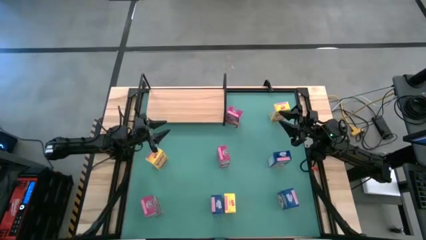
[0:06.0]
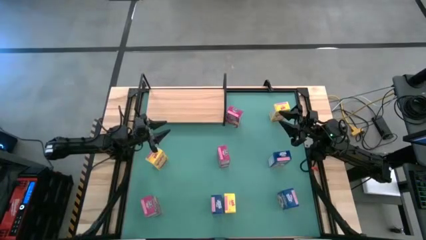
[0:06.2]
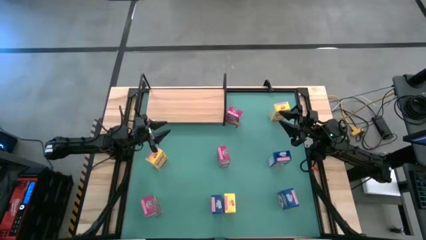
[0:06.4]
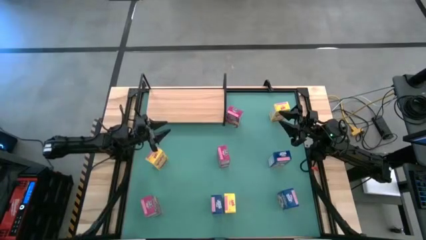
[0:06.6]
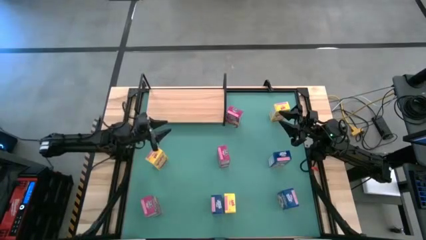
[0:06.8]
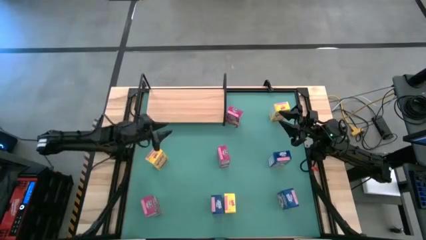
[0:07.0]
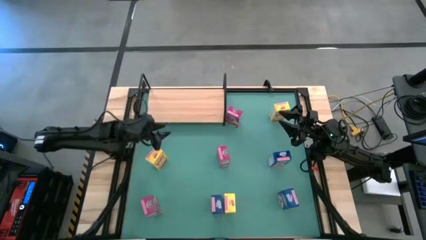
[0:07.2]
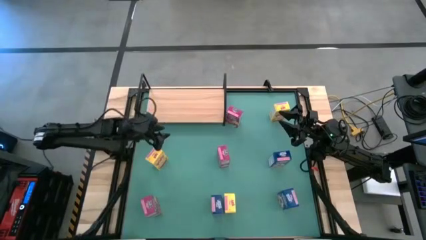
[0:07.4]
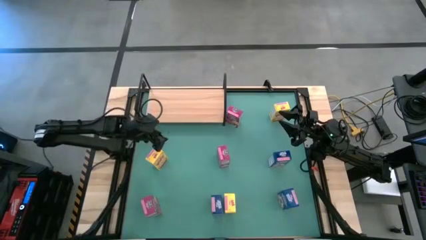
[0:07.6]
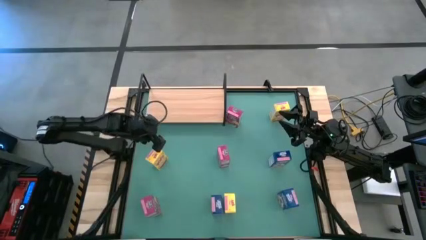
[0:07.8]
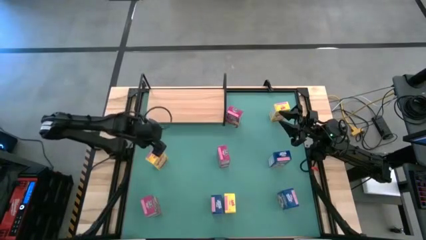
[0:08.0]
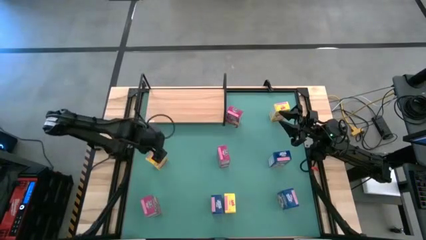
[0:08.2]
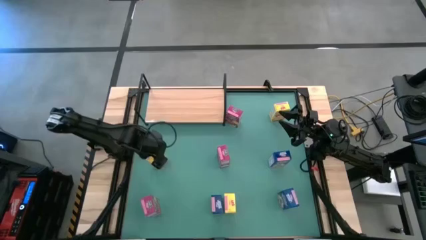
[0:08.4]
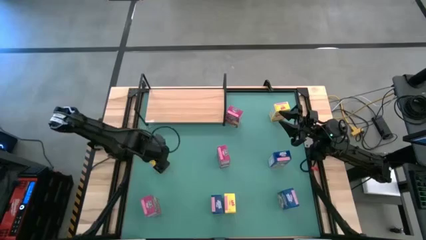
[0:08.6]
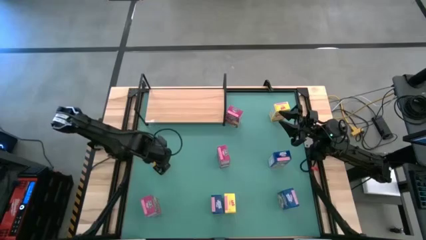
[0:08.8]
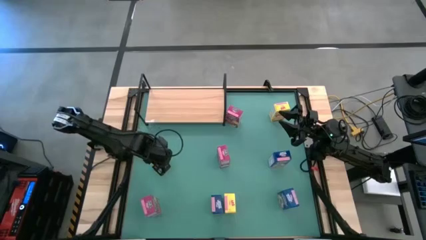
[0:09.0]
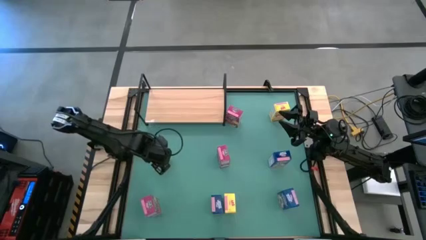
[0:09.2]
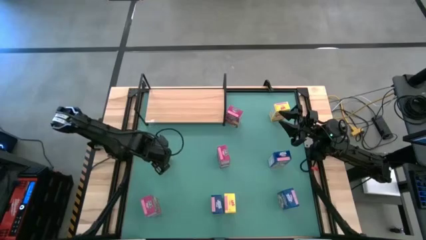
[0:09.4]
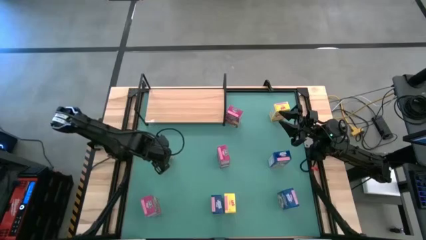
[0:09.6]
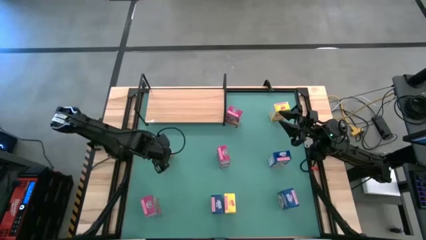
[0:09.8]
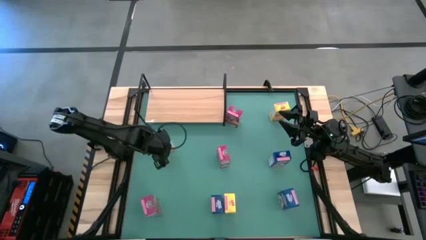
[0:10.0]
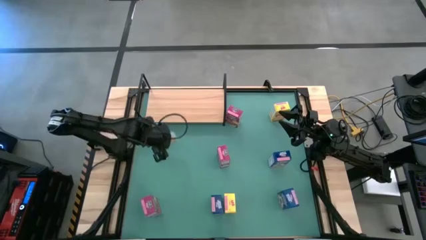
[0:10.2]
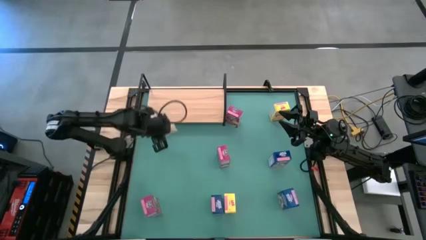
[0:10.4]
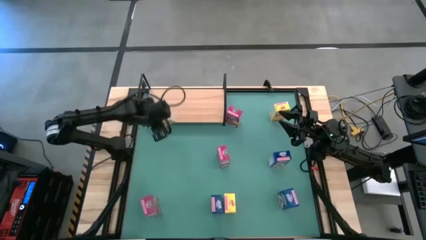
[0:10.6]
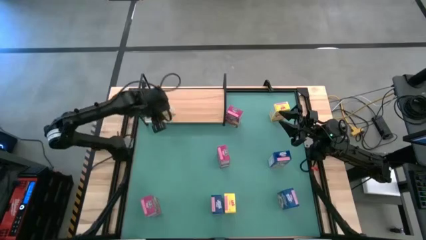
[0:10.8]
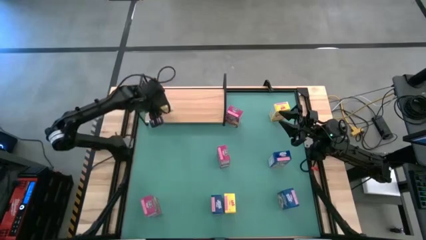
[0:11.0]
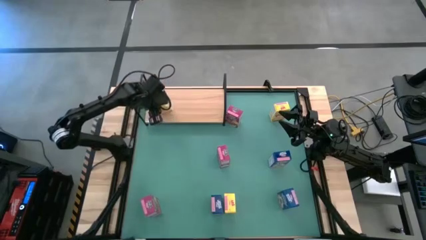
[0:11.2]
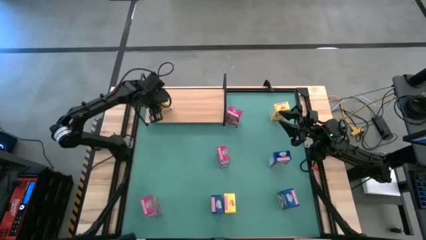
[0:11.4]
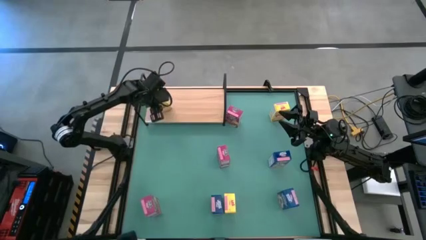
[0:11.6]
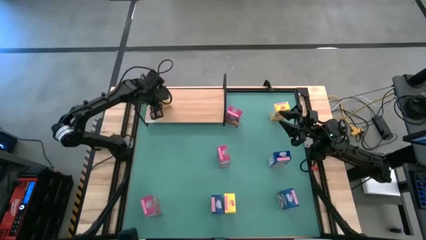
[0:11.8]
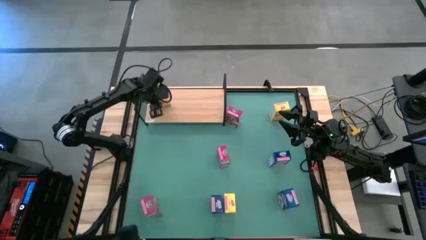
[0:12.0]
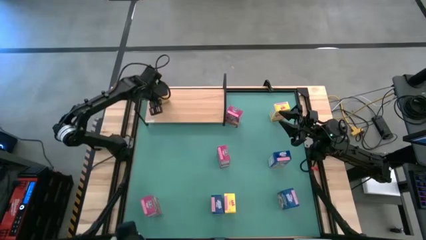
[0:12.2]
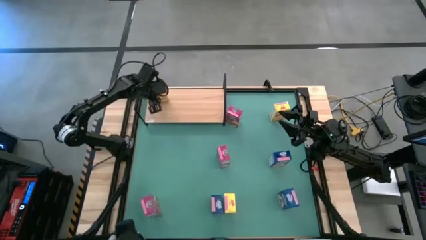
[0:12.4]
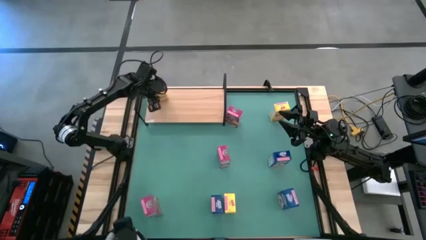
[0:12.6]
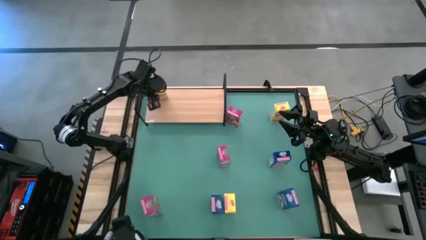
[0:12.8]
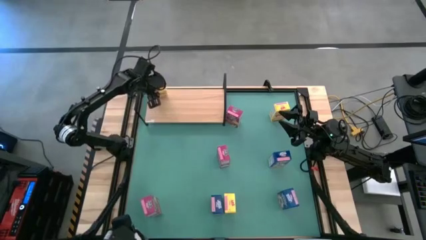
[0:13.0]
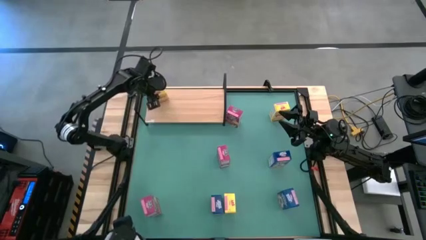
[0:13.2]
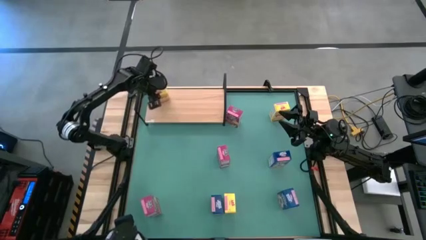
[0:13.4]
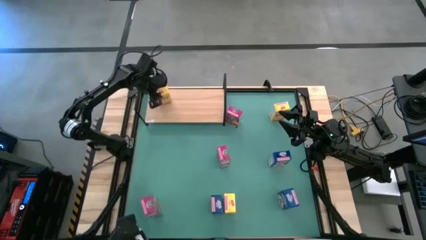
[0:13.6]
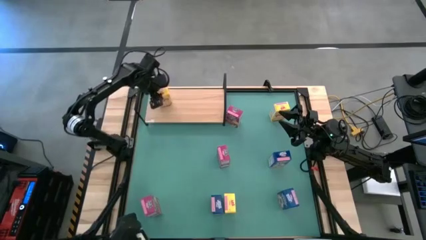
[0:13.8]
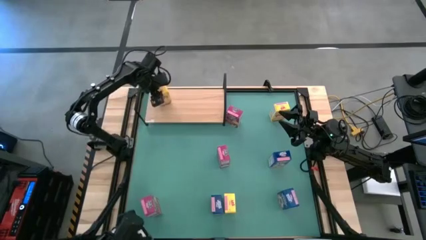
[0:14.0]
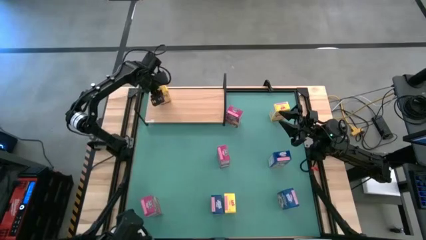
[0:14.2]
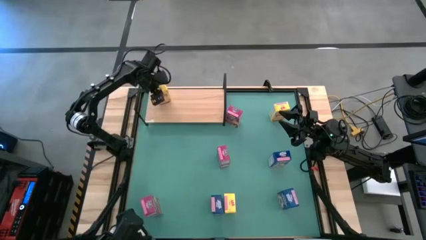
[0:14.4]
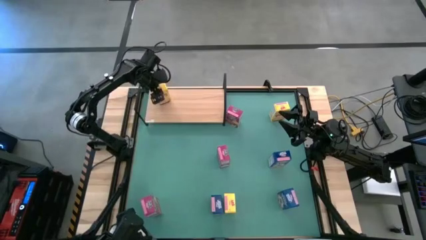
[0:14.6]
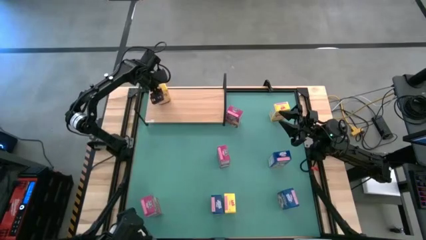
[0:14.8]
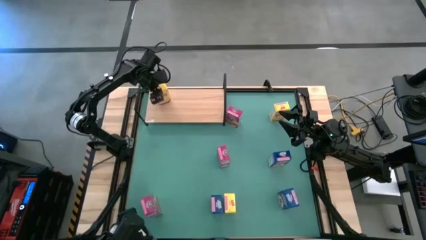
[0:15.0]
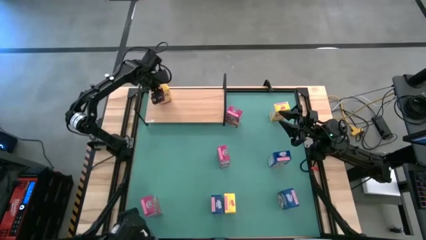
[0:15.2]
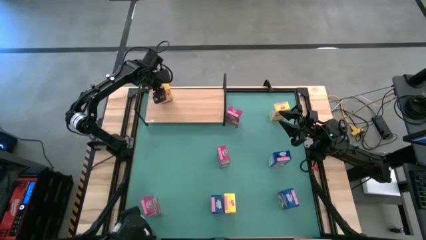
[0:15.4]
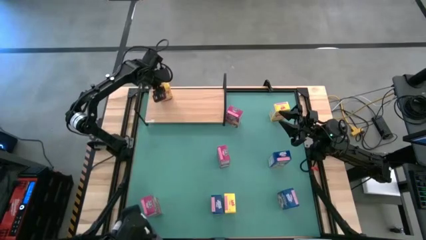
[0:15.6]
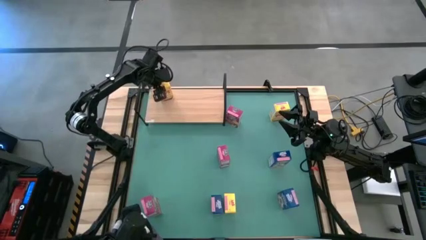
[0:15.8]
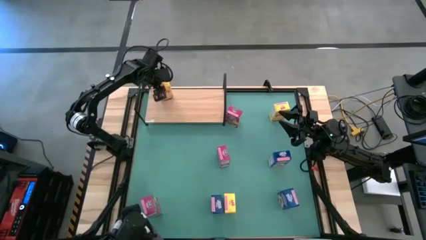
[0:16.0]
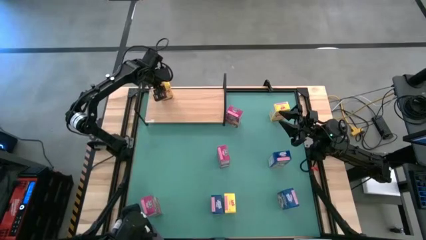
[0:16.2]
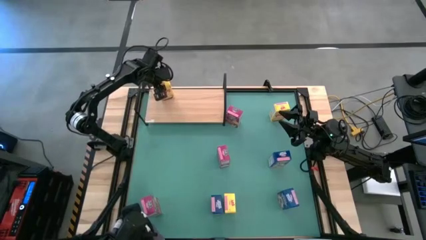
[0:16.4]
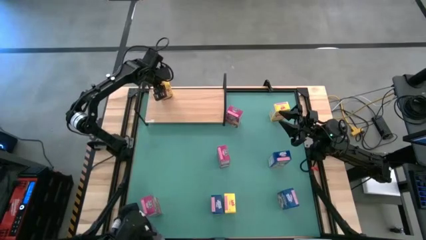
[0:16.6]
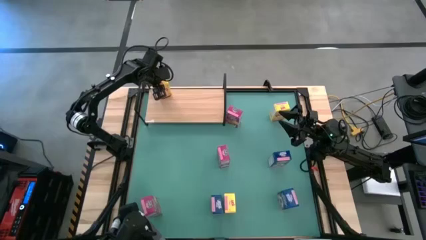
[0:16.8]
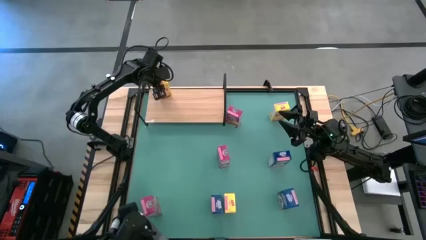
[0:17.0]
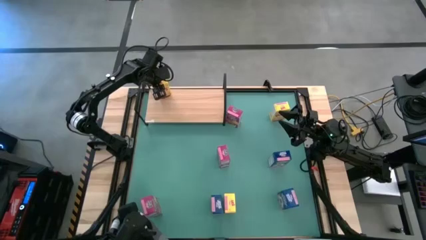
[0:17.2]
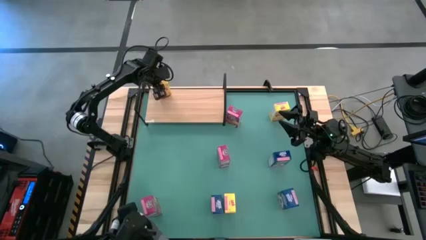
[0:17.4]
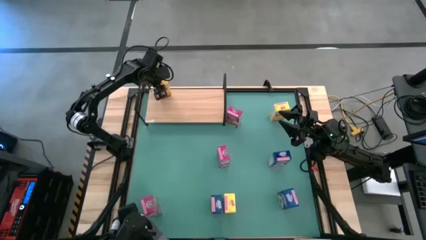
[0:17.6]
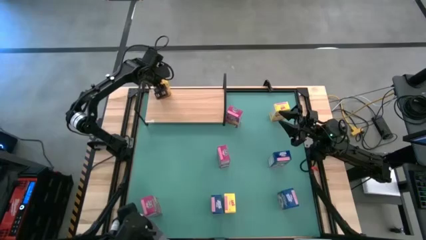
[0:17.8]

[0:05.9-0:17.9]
Task: Stack cereal on shelf
Put the middle yellow box cereal on the shelf

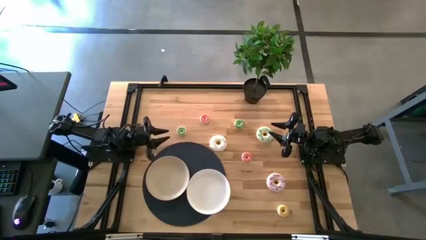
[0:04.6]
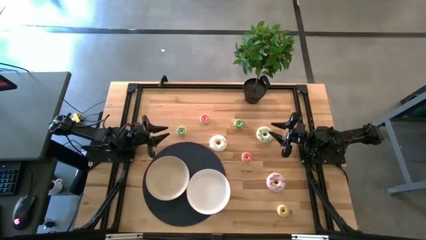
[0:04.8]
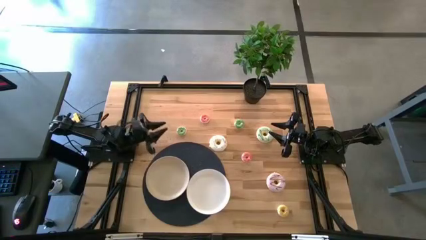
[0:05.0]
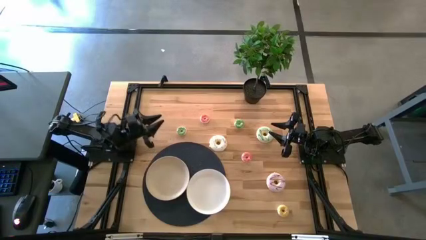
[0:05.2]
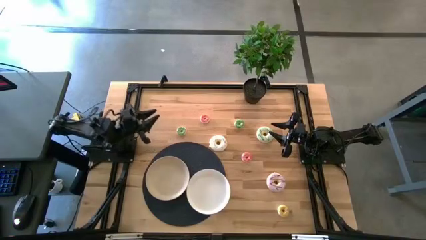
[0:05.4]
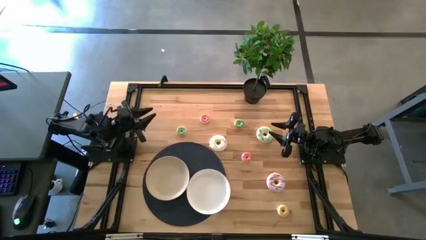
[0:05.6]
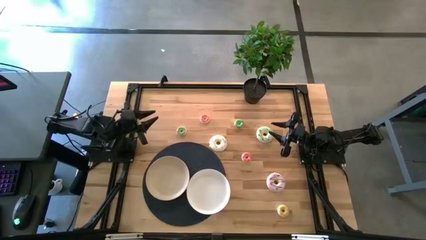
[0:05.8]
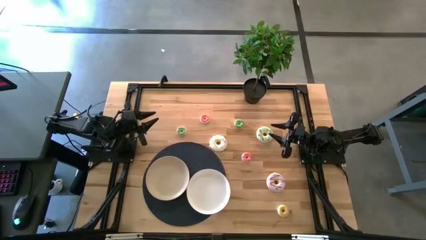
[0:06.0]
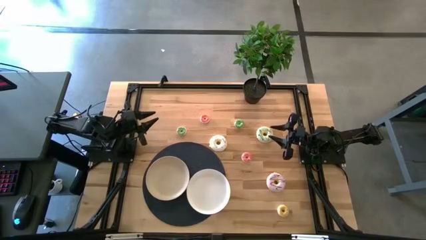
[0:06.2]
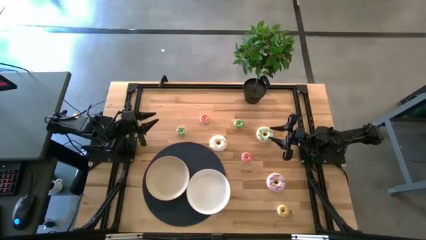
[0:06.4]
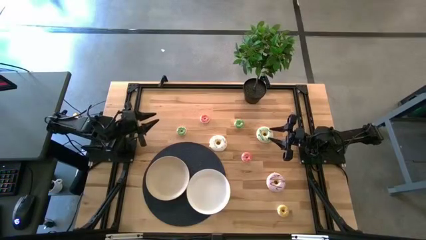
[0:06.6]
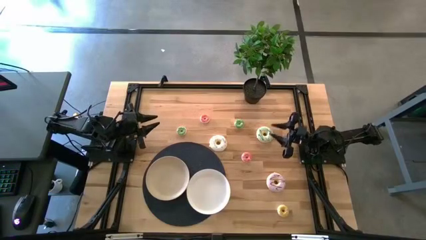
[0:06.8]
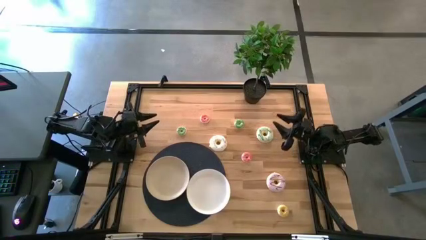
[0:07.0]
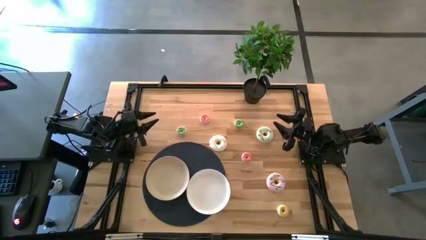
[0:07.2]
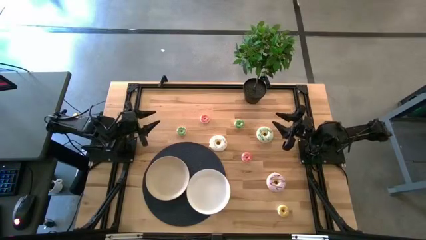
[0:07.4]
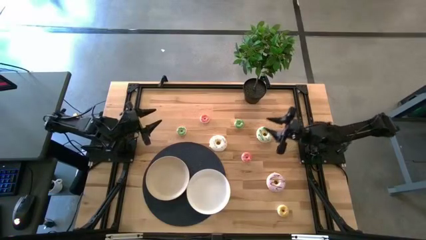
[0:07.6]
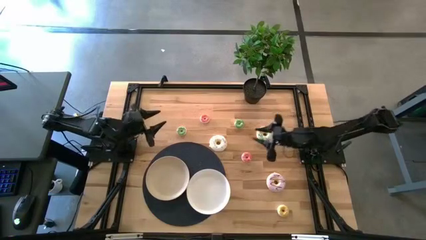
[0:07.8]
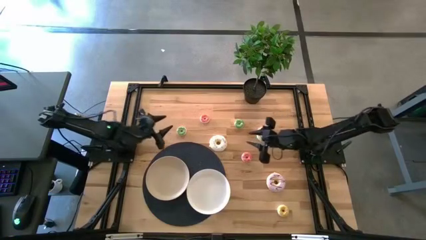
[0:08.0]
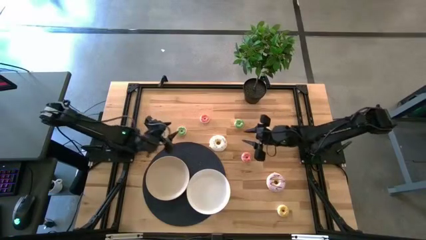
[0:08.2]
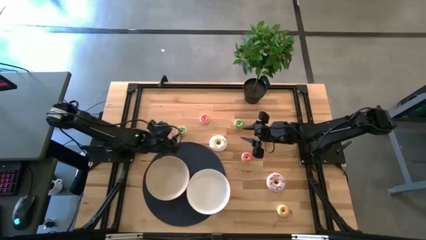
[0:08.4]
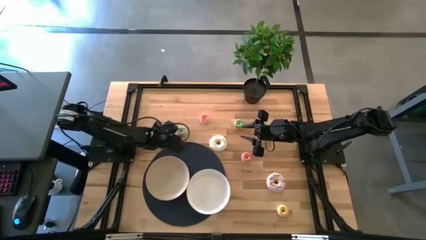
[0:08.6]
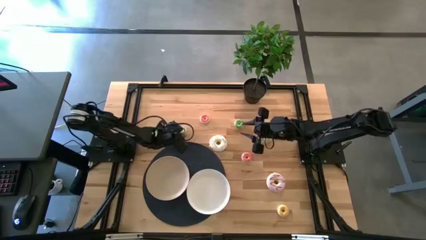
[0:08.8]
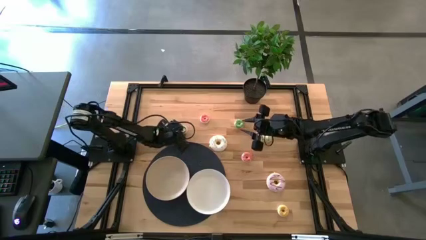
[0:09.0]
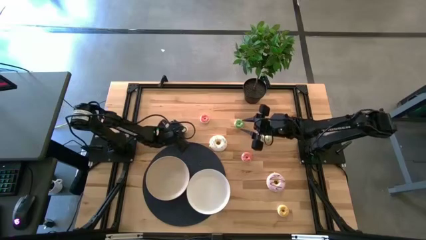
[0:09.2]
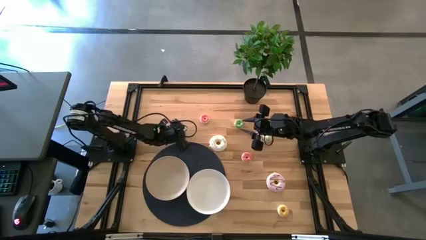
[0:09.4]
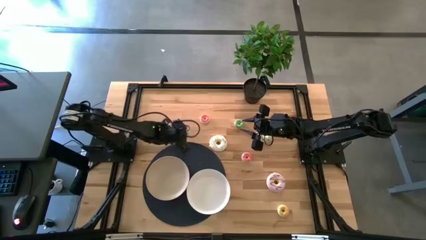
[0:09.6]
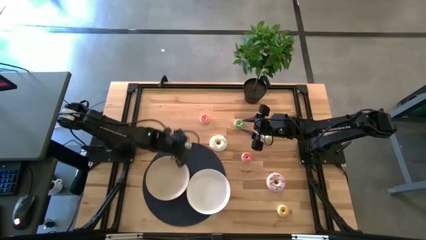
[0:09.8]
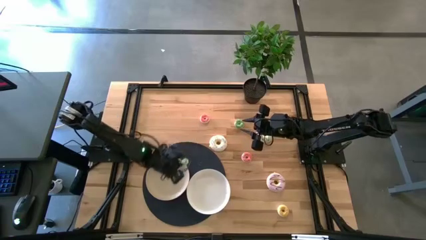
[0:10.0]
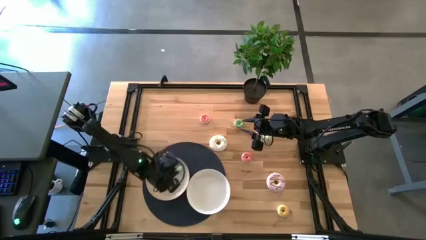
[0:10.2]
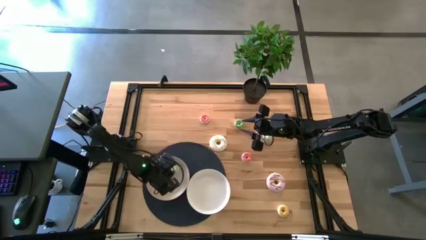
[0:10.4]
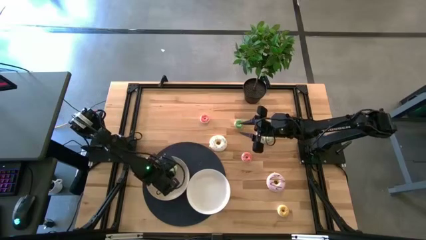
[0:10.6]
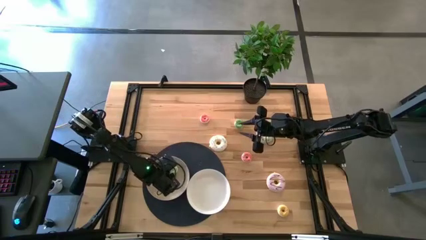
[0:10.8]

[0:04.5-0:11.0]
Task: Pick & Place donuts
Put the left small green donut on the left white plate
